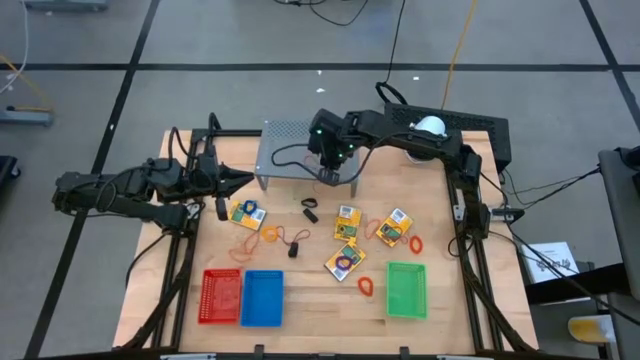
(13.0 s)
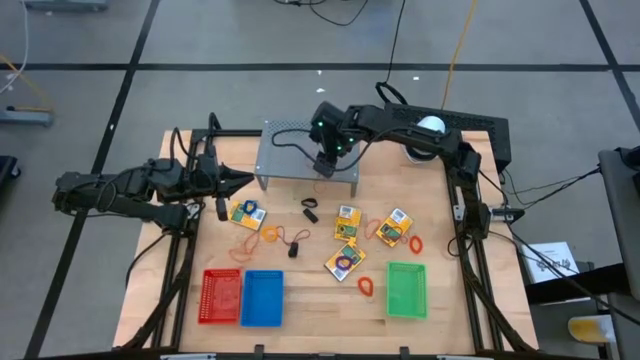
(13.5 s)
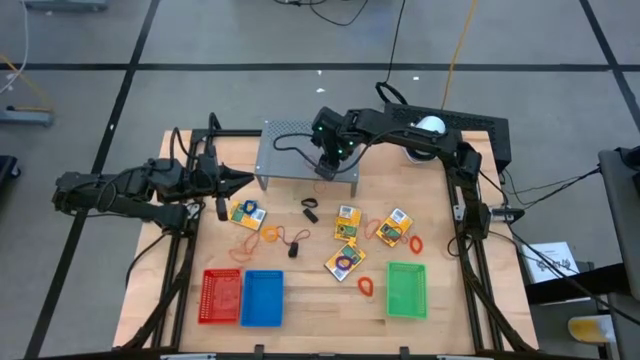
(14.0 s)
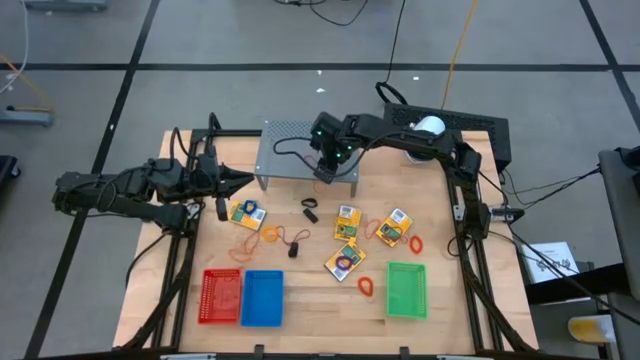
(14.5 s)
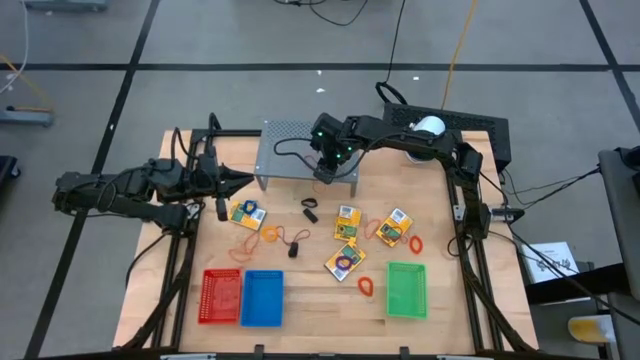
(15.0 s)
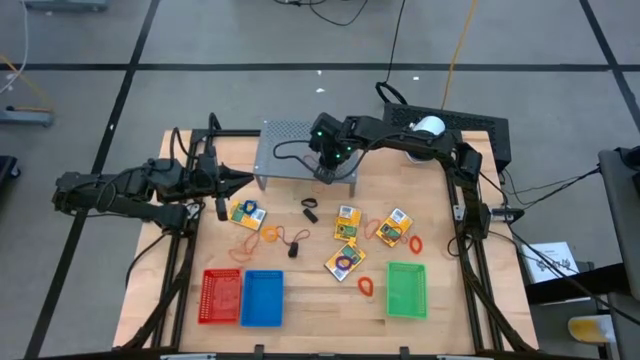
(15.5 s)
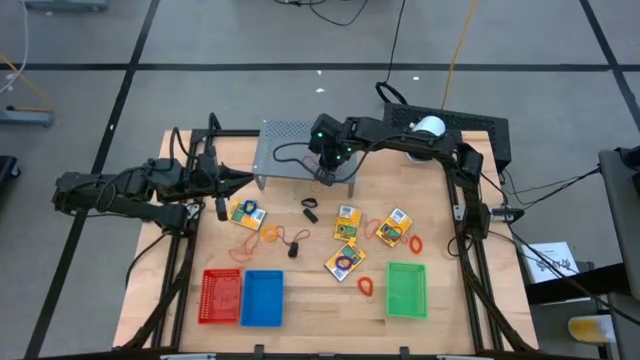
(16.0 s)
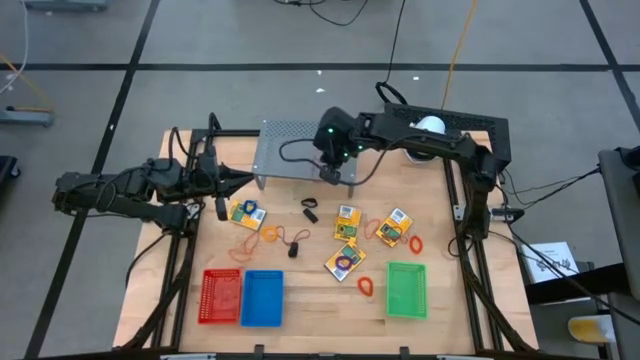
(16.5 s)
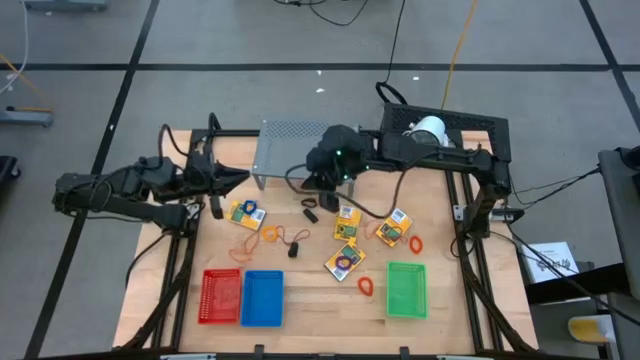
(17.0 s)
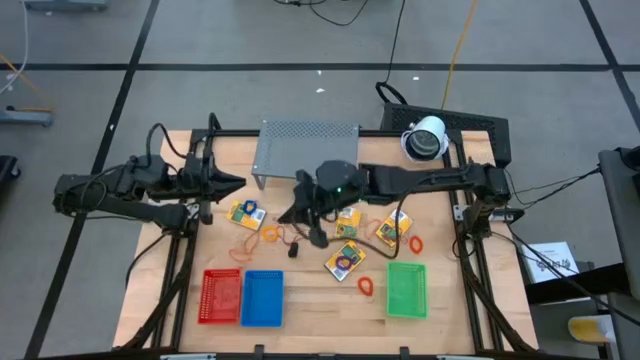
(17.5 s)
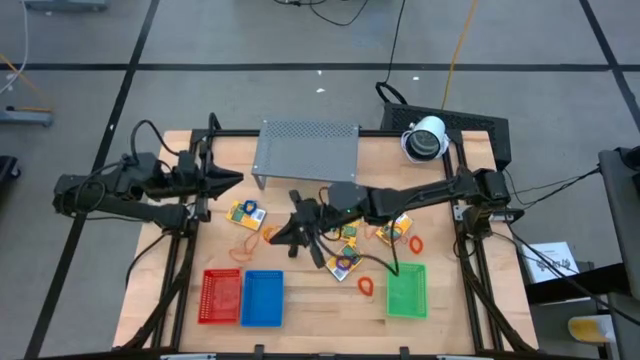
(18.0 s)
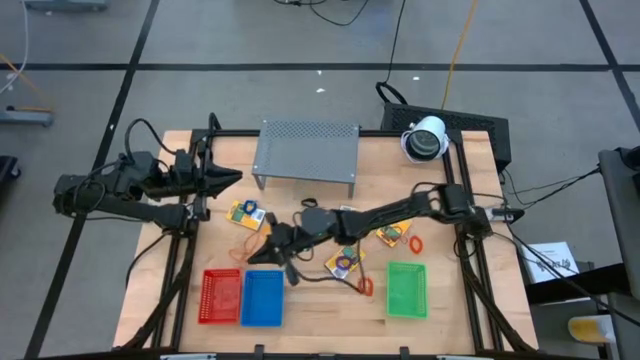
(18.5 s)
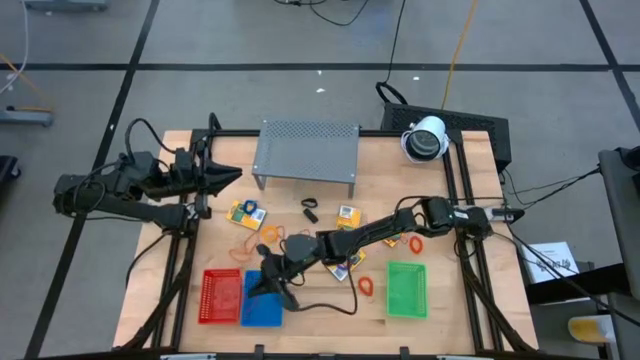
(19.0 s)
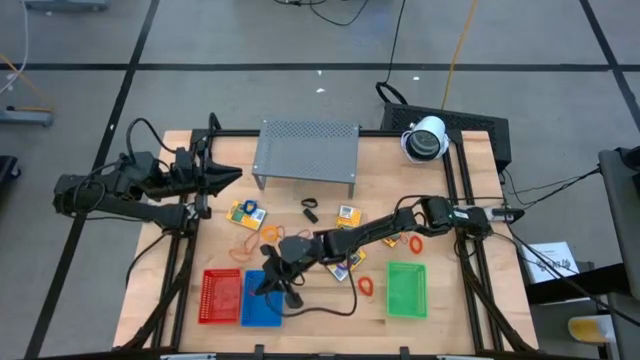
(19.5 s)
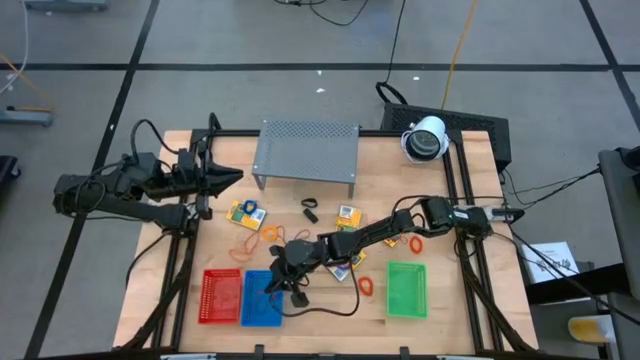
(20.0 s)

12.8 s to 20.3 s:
Task: Pick & Place Office Desk Supplies
Put the red rubber band into the blue bin

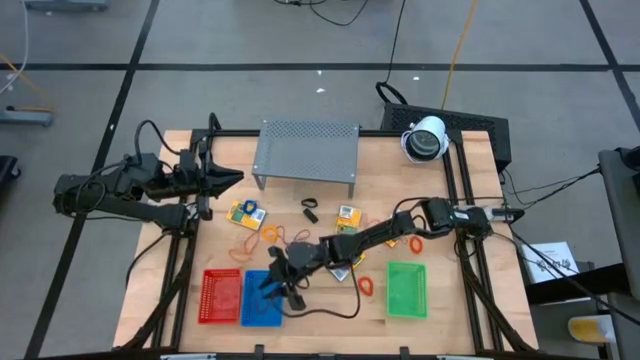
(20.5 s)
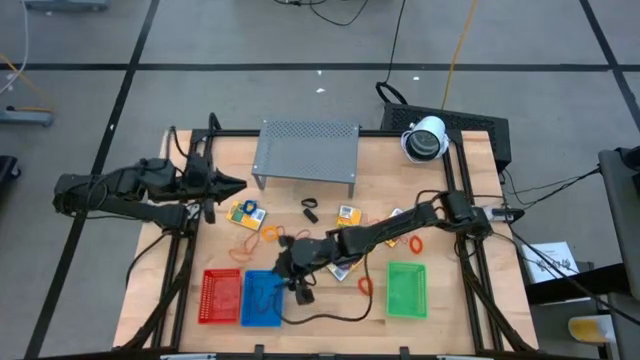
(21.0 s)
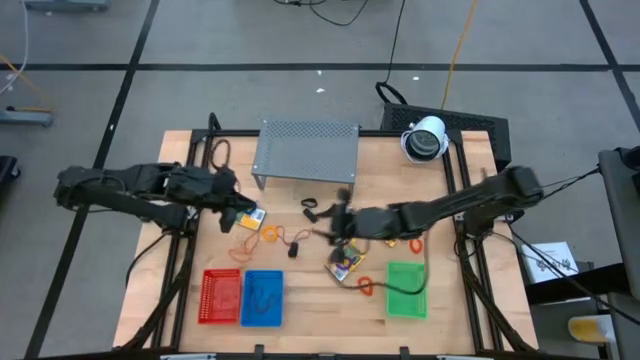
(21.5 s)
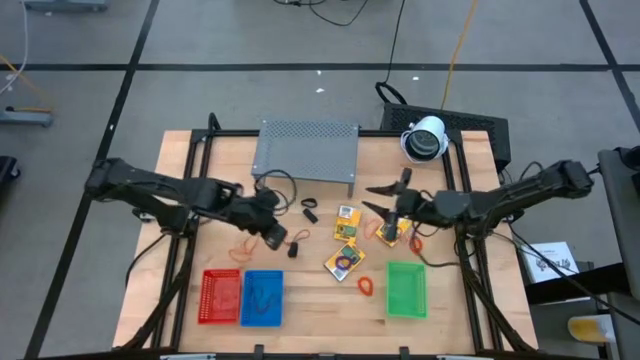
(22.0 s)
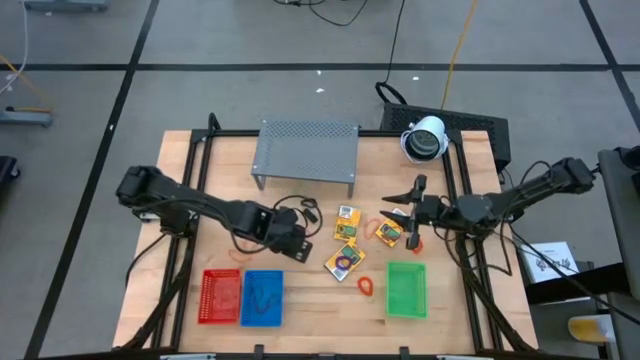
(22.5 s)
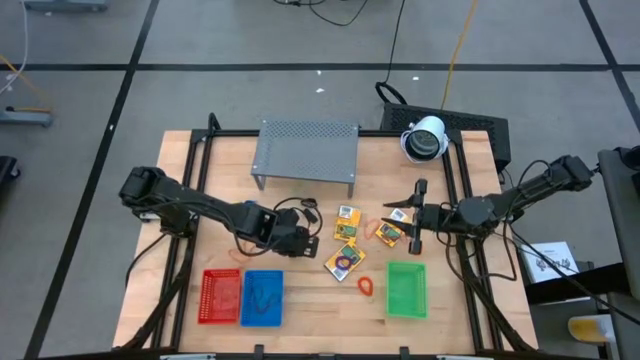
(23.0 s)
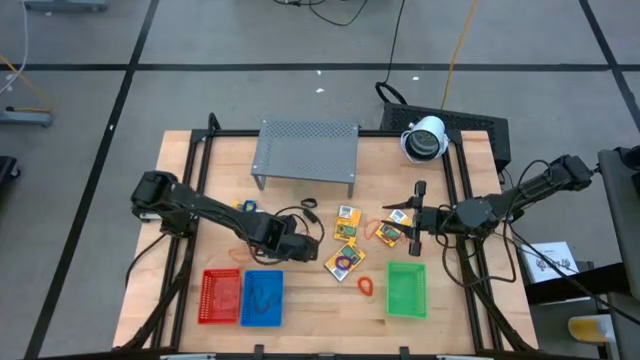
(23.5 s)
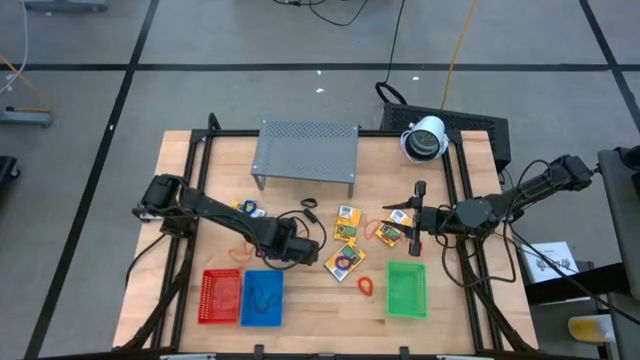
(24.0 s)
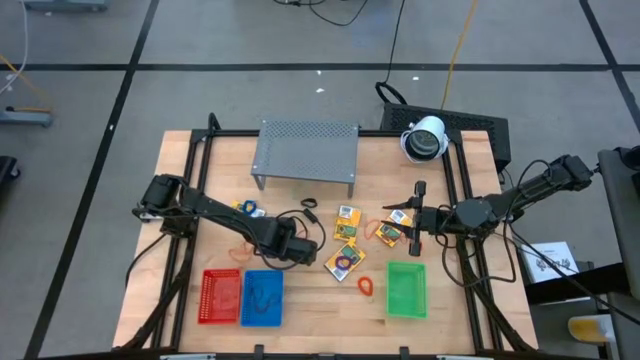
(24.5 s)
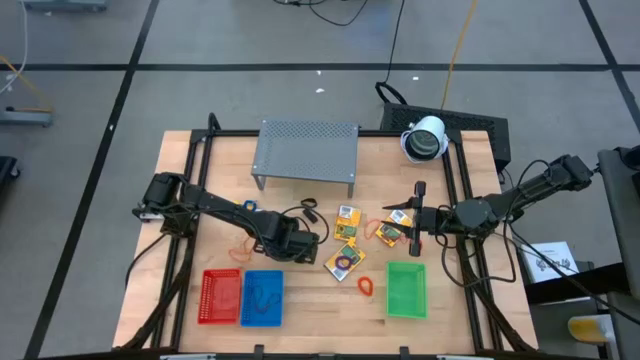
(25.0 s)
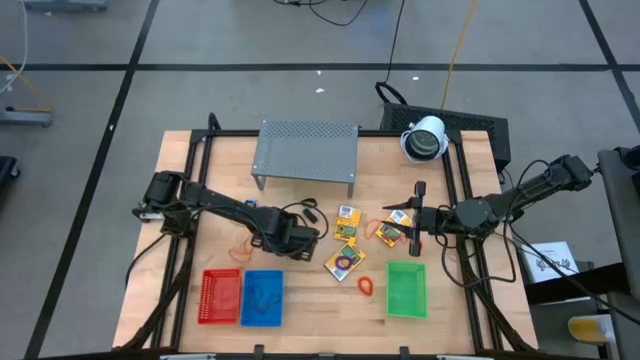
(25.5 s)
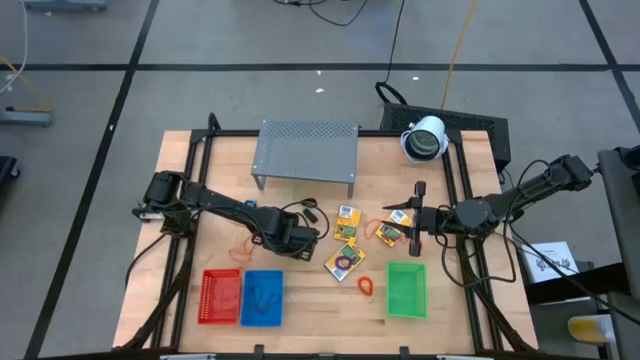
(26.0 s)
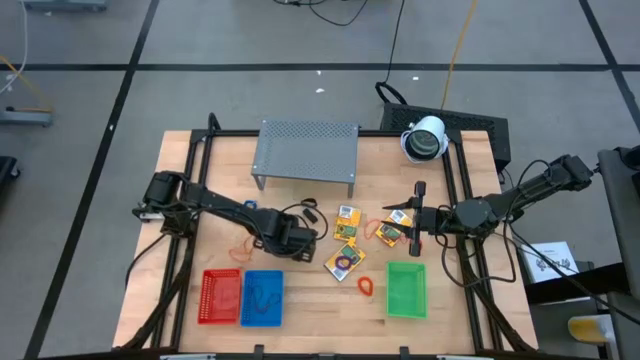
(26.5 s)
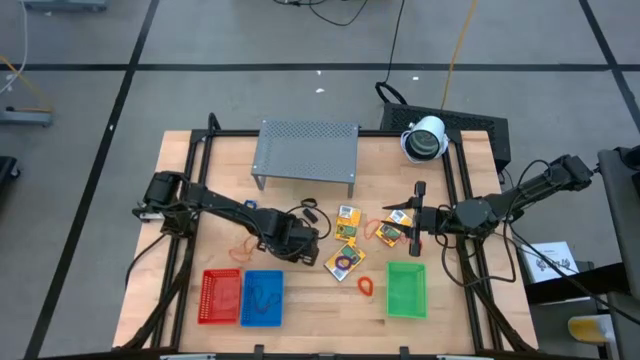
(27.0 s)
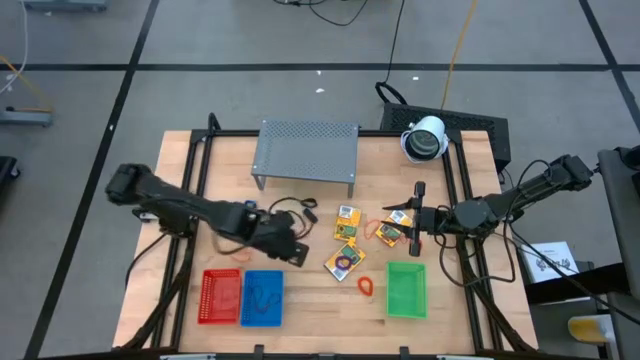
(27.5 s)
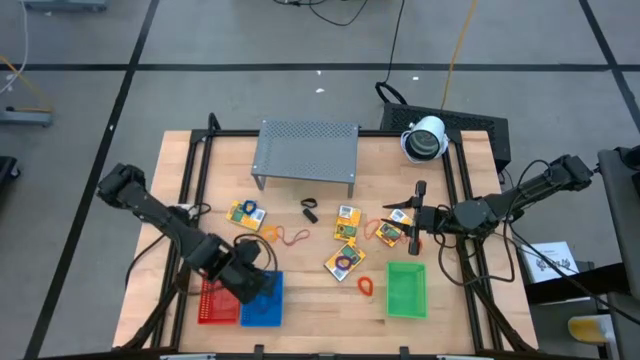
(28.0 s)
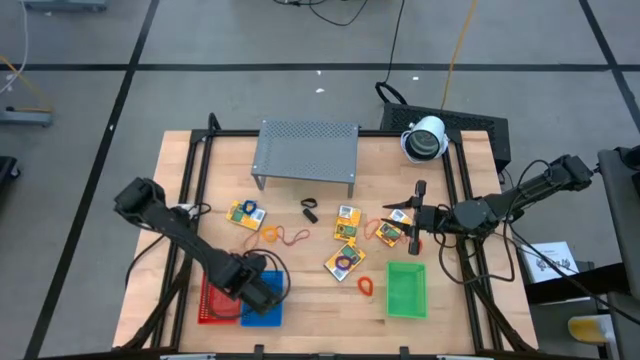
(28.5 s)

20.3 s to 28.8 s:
Put the black rubber band into the blue bin

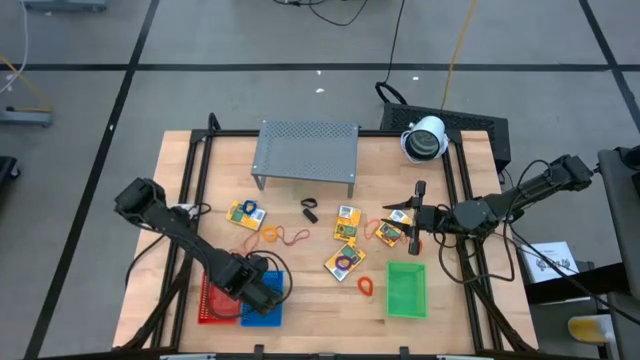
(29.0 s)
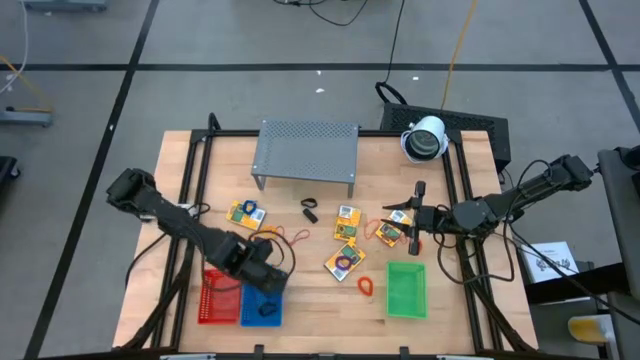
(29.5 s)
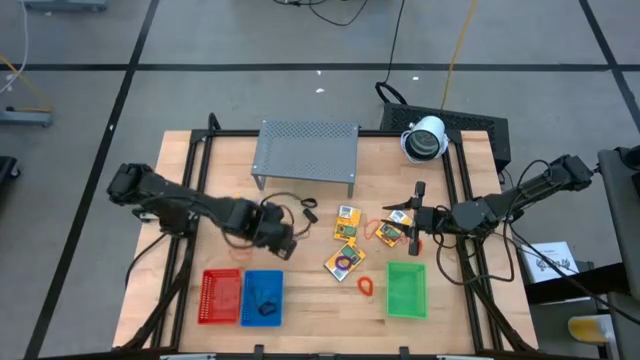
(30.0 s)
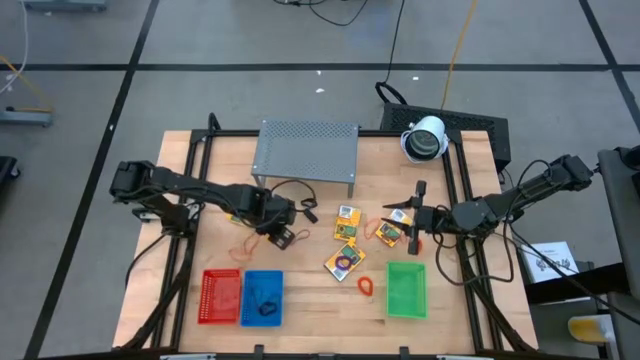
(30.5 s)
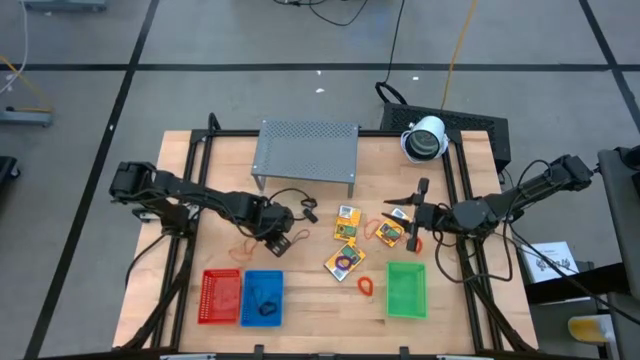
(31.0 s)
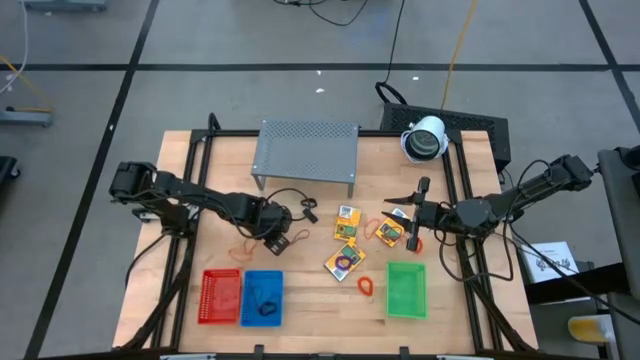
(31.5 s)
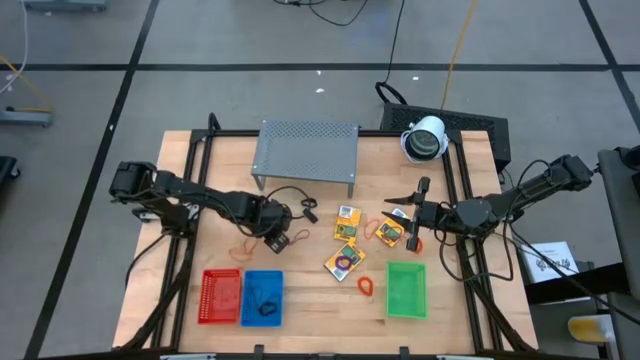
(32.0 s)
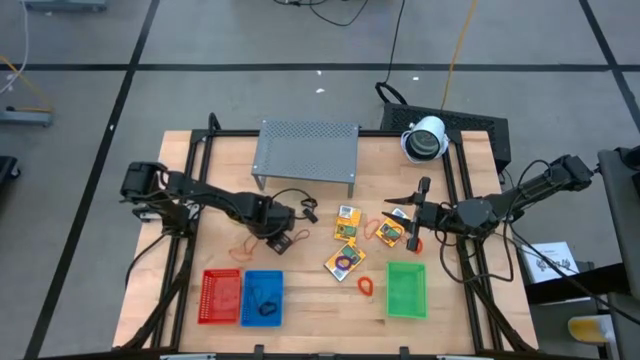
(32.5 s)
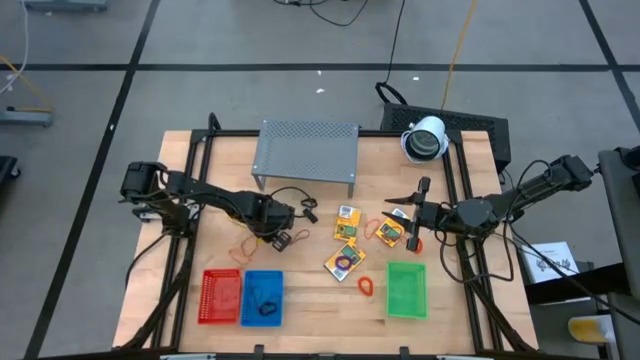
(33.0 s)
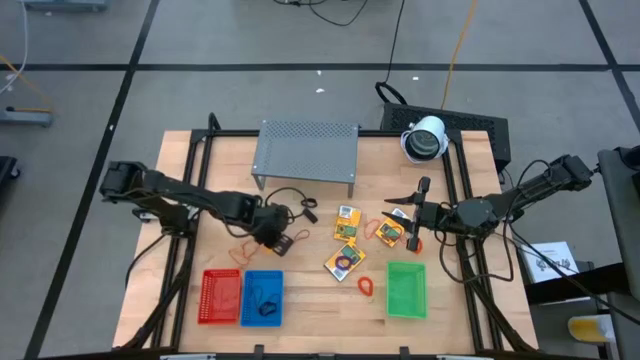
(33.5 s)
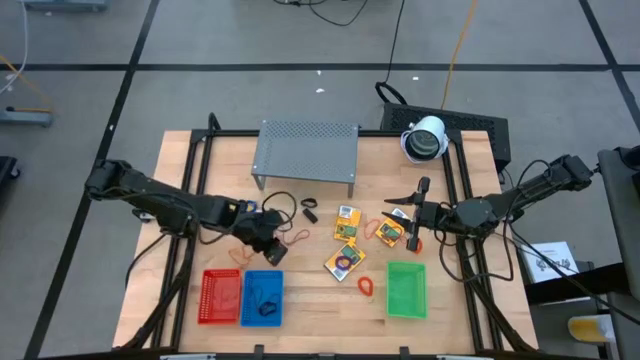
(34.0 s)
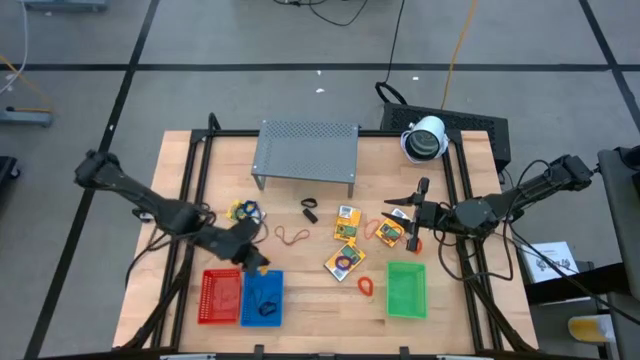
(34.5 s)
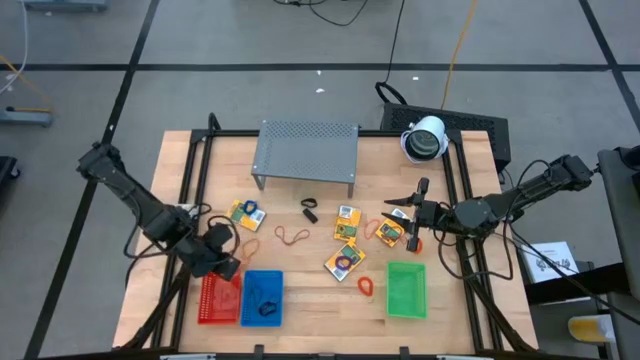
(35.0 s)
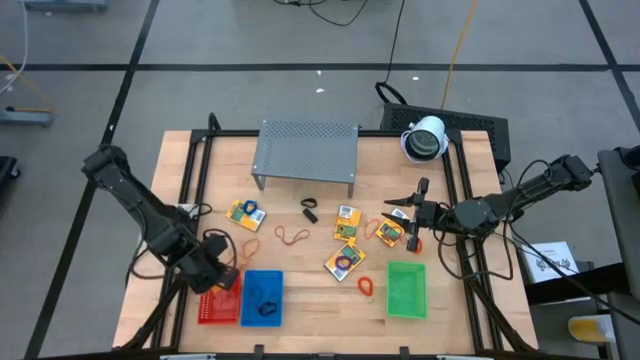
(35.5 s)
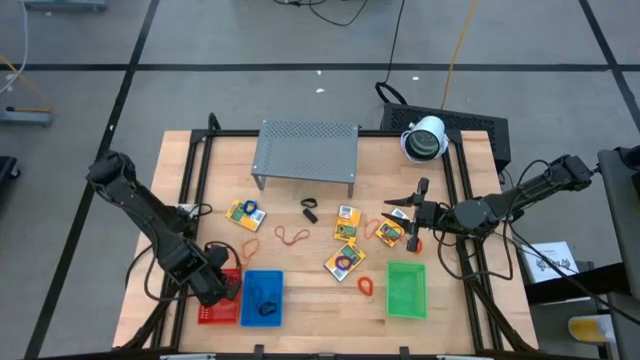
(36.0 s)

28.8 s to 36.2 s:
Put the orange spring keychain into the red bin
